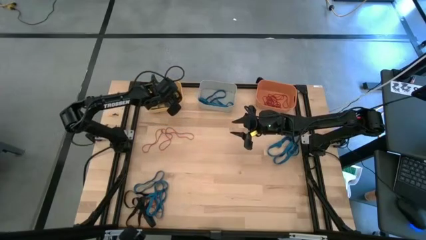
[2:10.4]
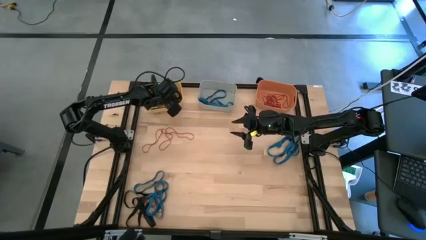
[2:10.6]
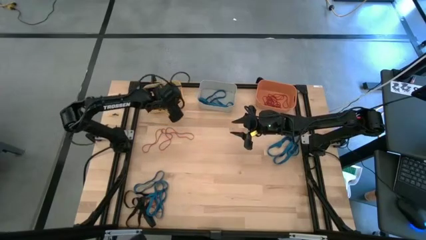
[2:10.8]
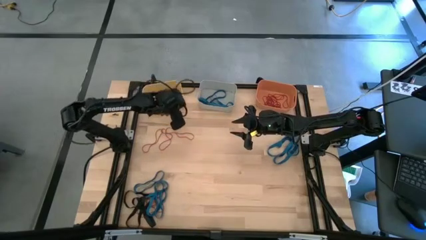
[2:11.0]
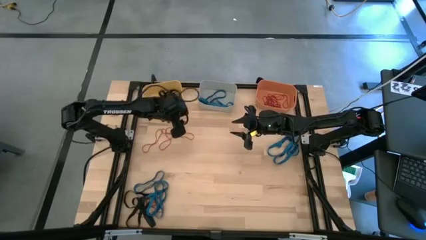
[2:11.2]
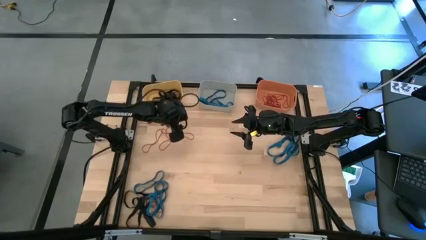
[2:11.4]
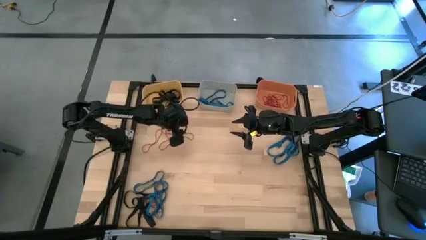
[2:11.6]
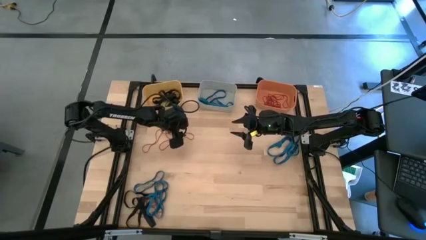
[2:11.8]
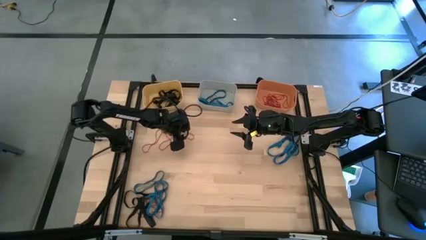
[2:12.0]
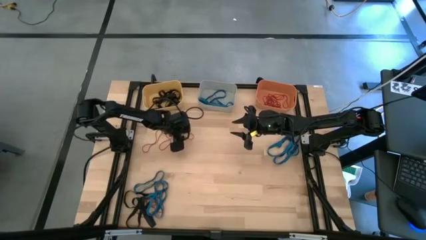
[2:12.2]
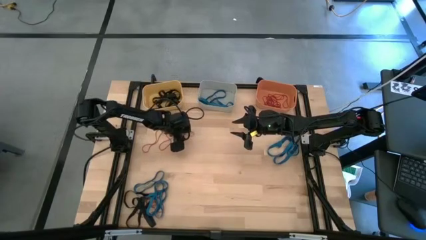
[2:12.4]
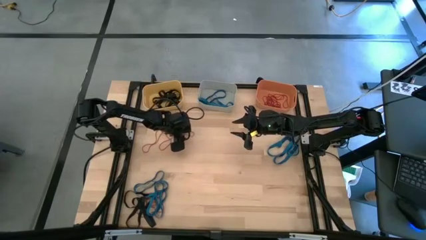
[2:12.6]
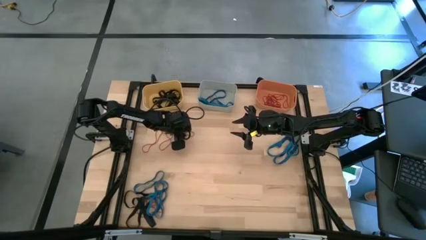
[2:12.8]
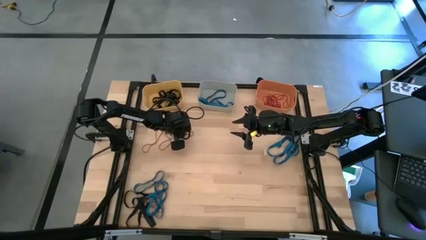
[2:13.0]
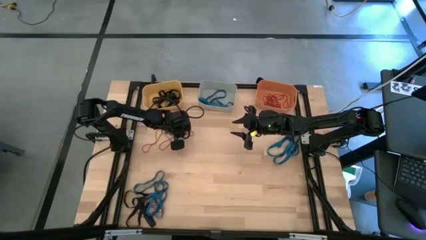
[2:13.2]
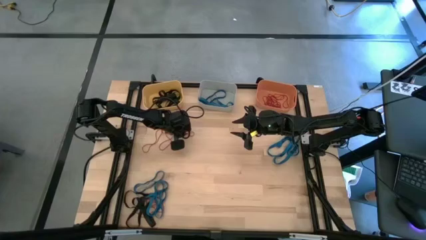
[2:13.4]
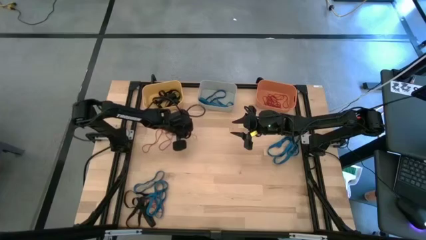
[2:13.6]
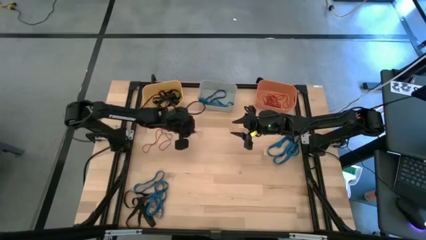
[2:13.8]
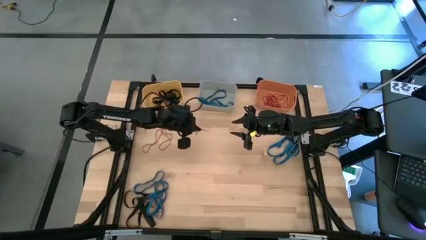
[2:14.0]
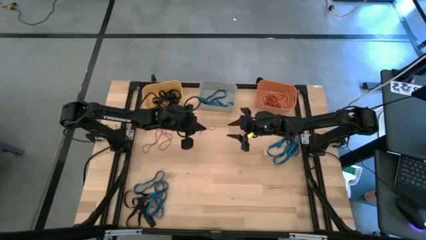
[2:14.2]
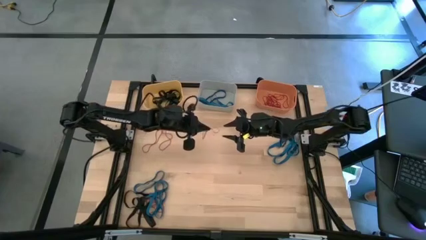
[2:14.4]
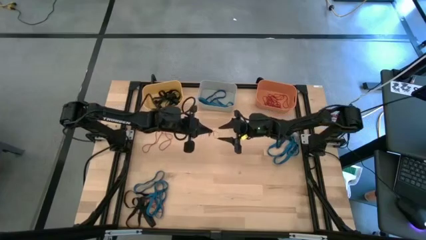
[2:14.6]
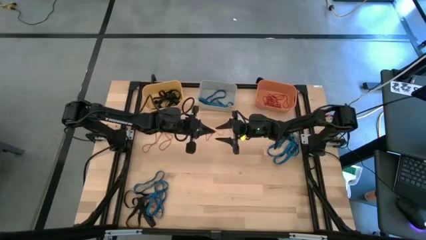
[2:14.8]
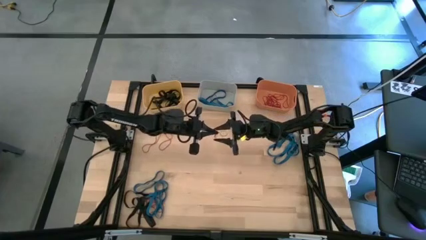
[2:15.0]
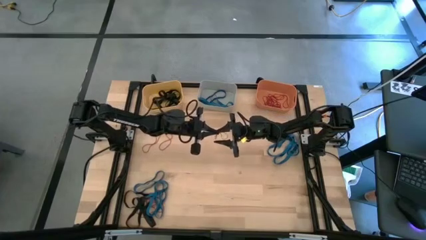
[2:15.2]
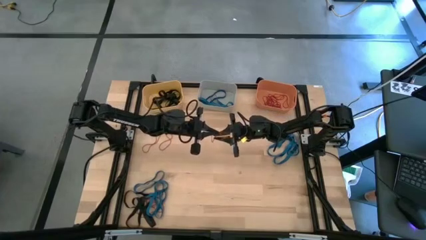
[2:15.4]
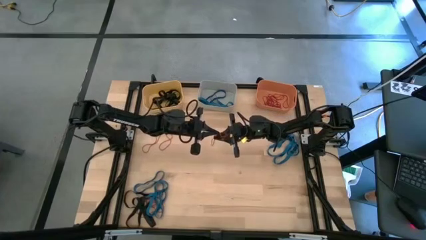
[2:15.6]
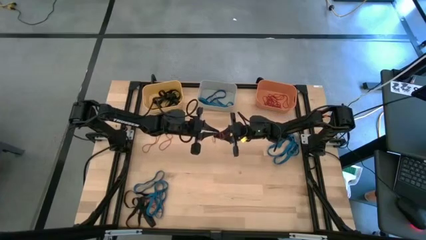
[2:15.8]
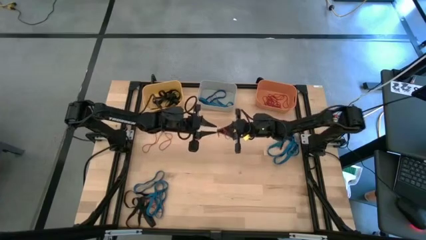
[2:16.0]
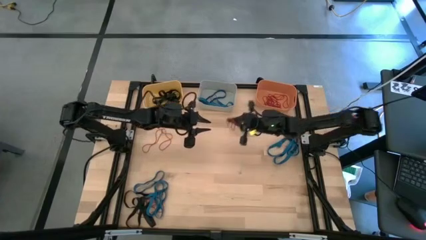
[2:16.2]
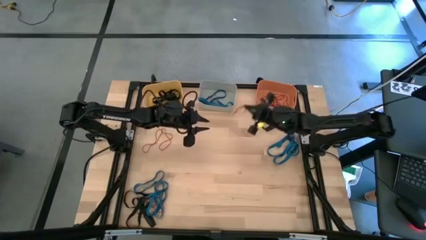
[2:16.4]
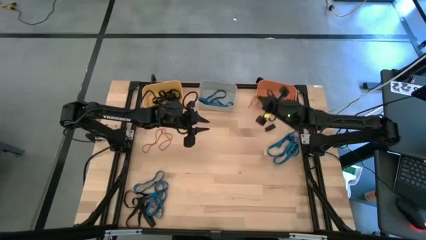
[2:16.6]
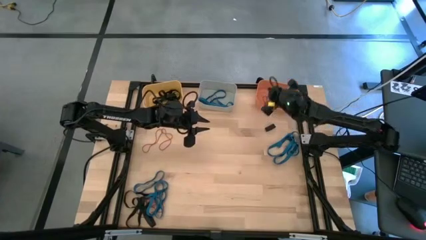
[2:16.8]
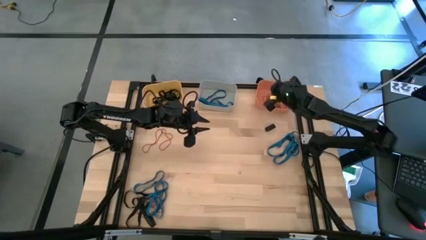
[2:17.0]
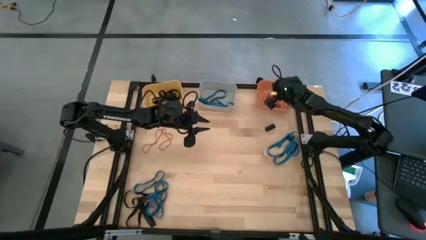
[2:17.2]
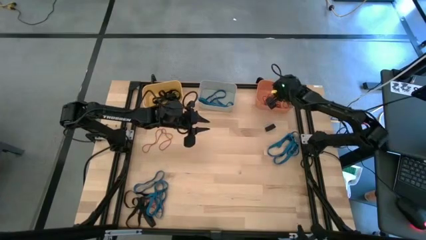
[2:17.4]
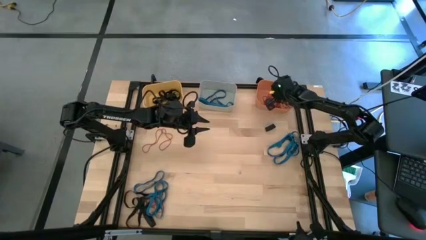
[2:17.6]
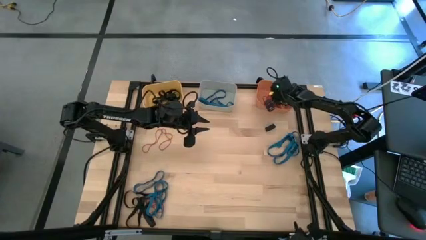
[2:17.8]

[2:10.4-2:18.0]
Task: Sort rubber bands into baskets
Put the red rubber band into the orange bin

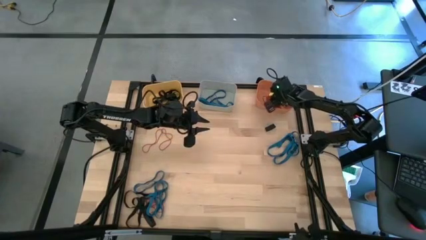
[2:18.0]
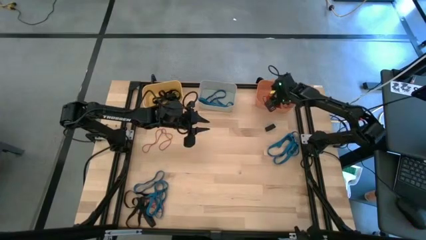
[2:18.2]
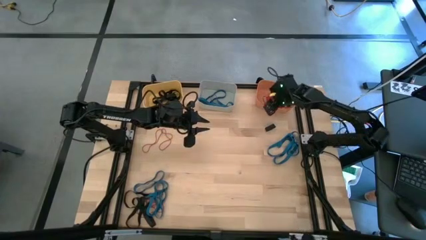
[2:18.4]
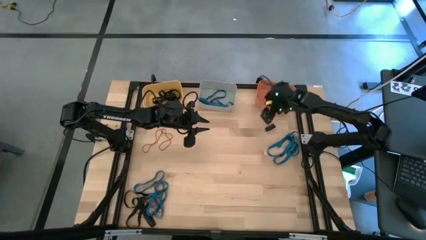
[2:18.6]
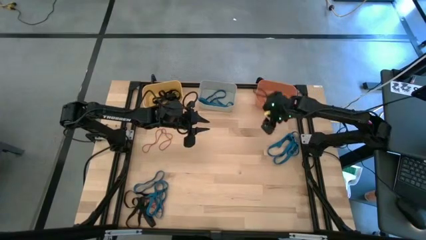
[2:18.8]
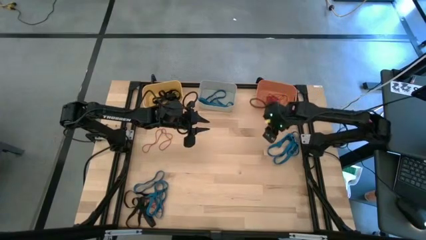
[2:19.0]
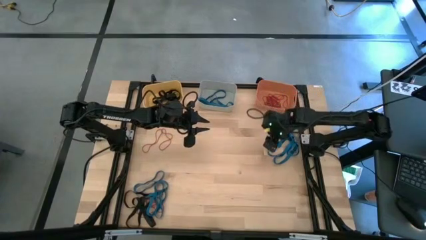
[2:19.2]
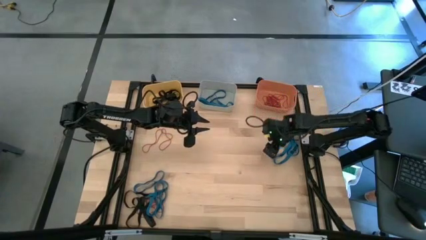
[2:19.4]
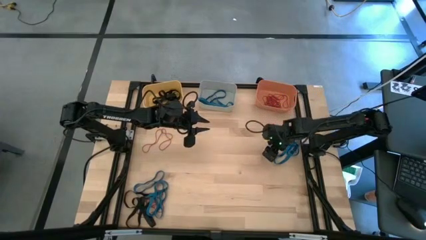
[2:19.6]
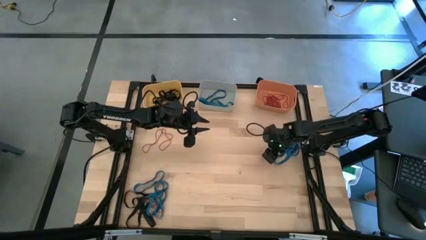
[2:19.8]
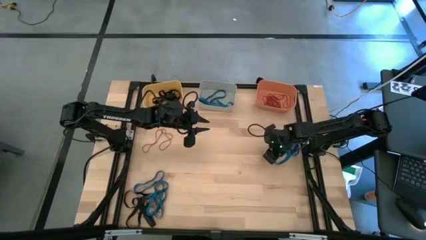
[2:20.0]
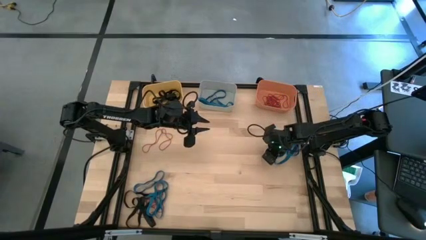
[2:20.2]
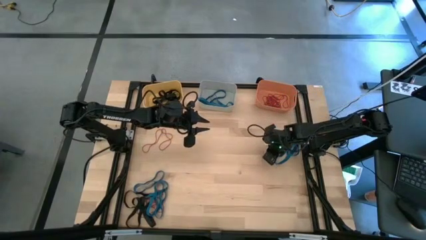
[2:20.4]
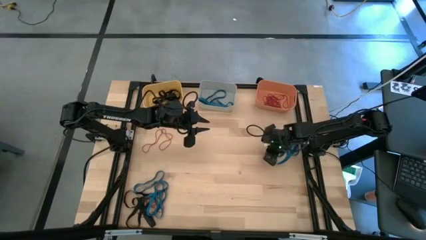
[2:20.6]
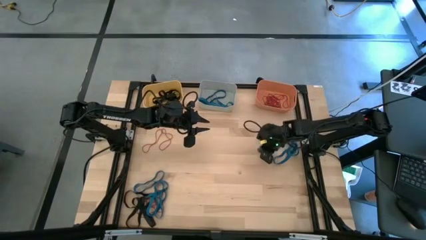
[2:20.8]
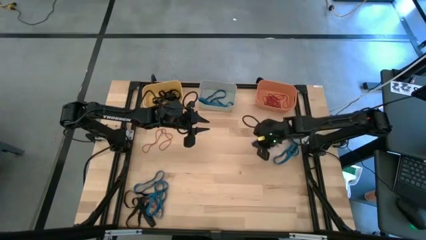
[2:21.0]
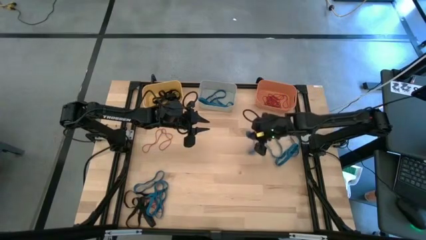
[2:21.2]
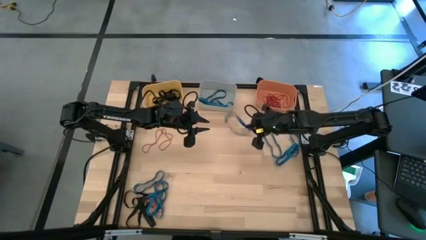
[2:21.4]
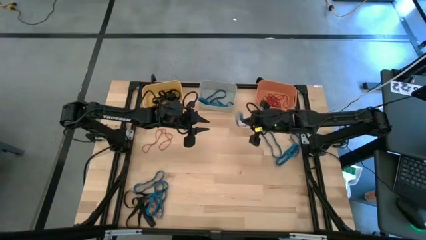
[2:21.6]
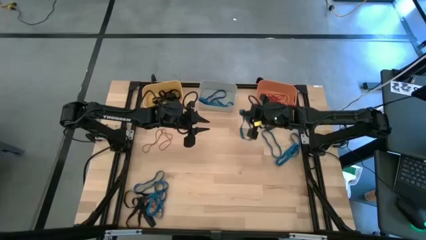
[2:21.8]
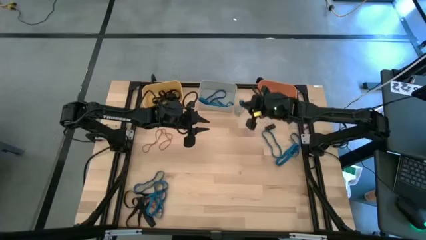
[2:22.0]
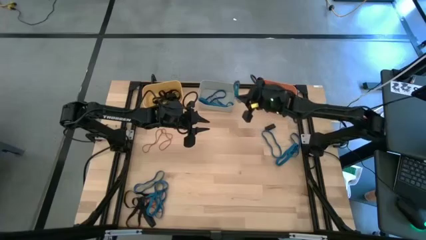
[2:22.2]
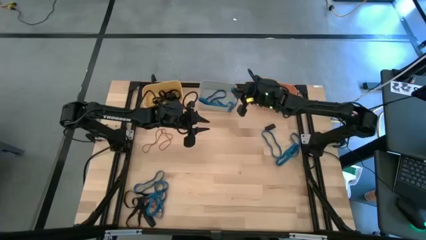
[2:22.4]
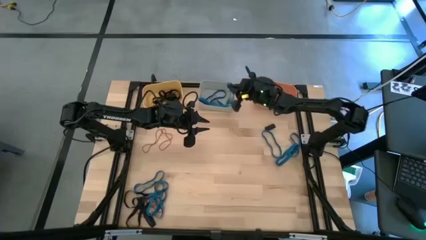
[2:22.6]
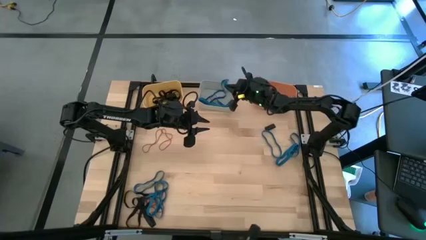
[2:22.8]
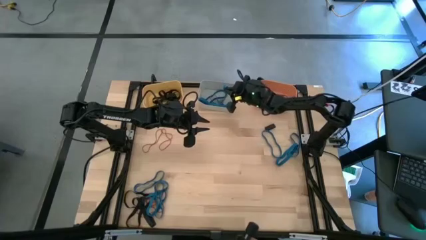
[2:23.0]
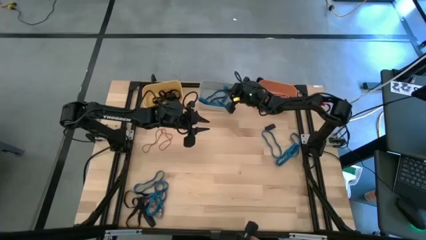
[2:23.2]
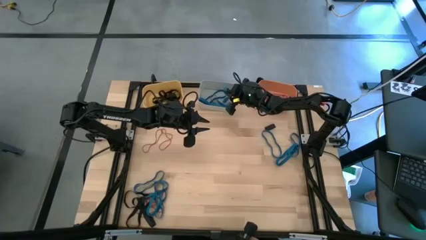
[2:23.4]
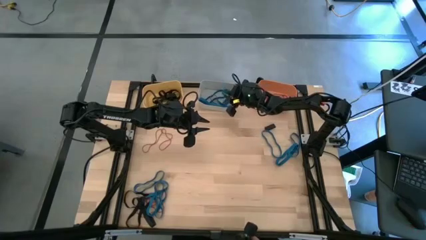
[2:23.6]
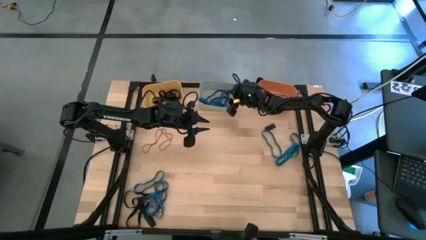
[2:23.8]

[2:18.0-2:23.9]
Put the blue rubber band into the grey bin

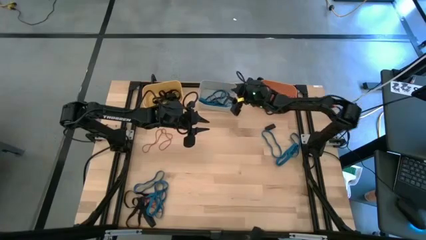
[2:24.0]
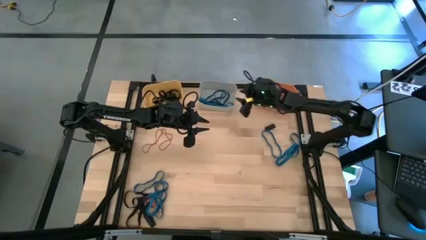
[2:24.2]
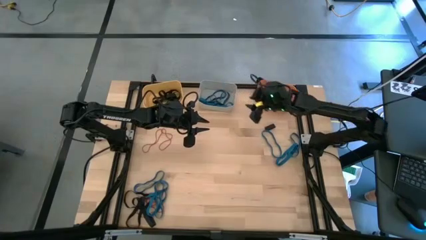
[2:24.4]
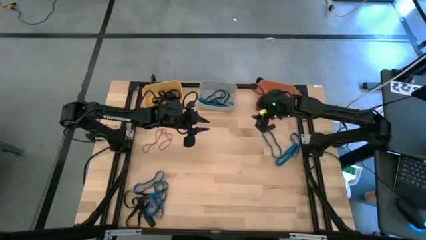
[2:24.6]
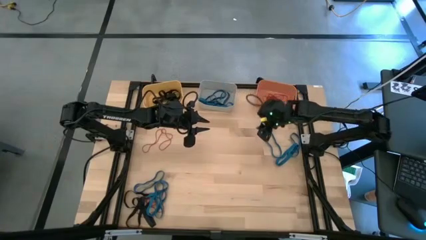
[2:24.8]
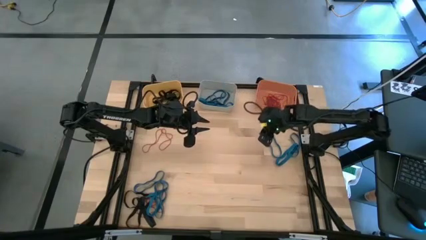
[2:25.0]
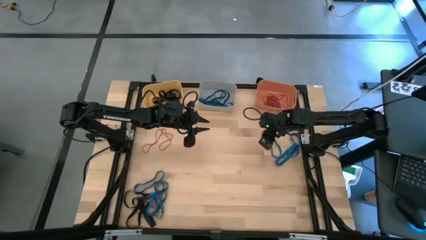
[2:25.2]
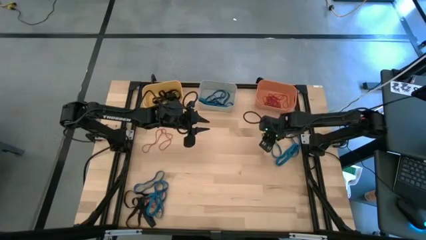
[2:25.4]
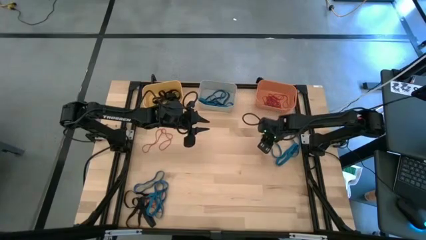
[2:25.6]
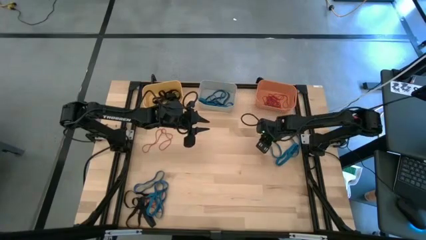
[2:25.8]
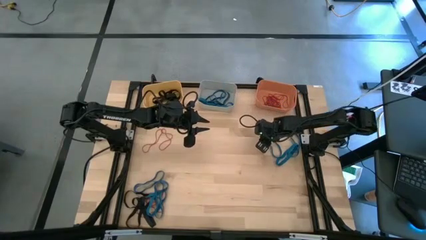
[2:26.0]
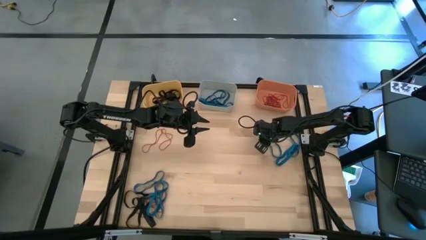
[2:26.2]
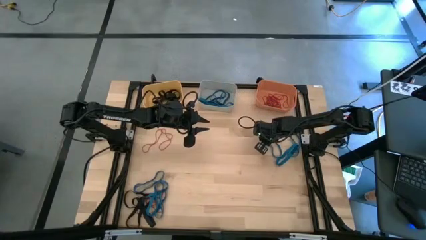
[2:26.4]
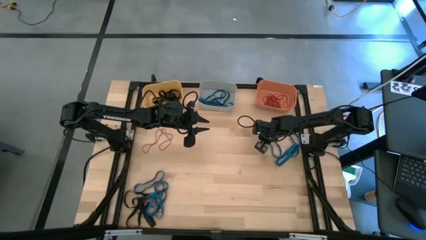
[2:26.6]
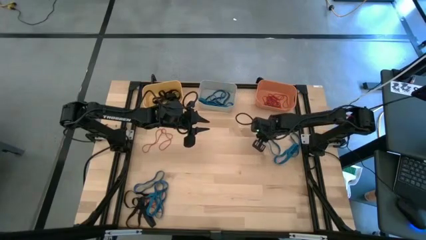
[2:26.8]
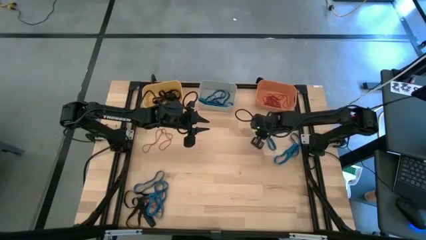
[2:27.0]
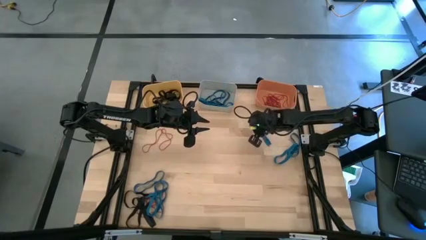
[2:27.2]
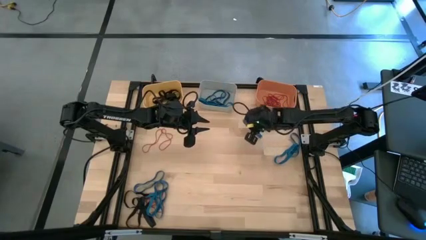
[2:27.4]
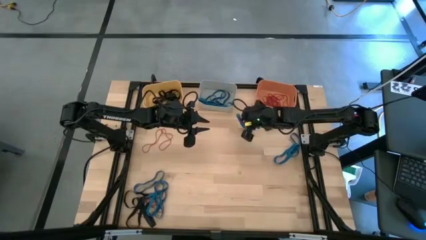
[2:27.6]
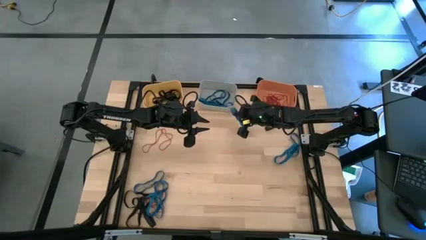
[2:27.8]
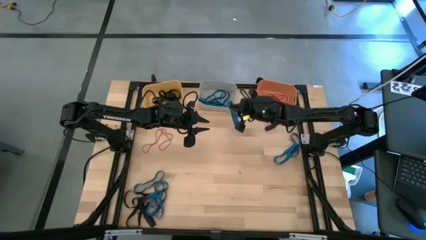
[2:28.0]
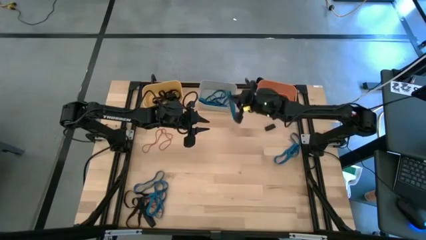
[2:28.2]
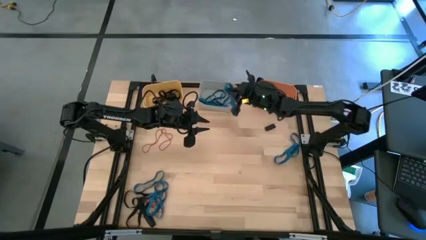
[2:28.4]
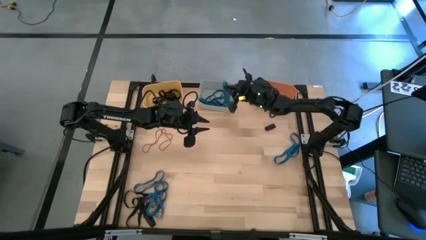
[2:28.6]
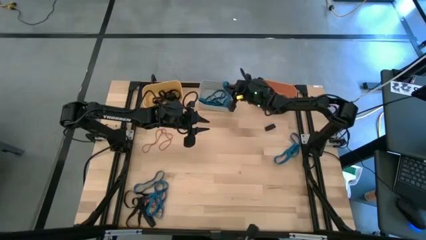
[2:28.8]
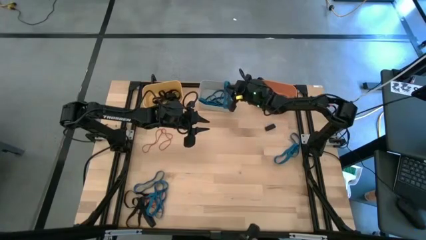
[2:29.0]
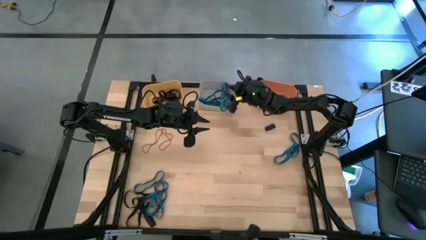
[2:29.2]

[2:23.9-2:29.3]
Put the blue rubber band into the grey bin
